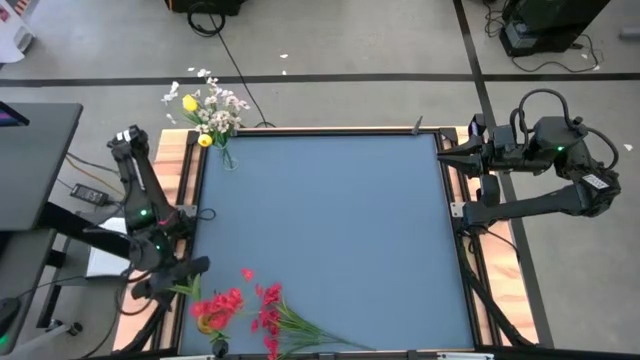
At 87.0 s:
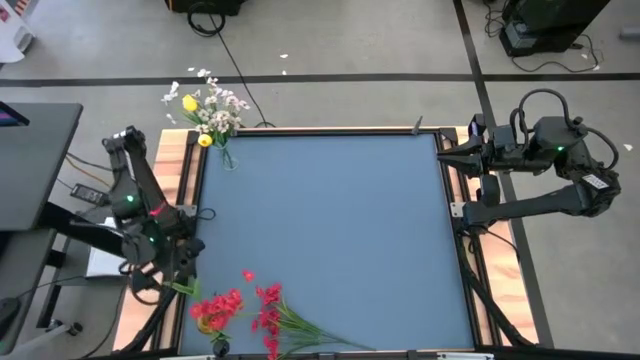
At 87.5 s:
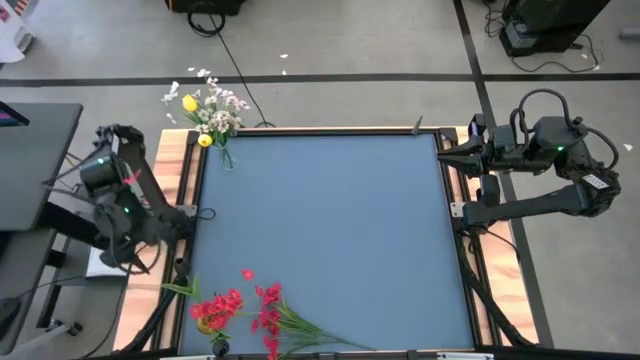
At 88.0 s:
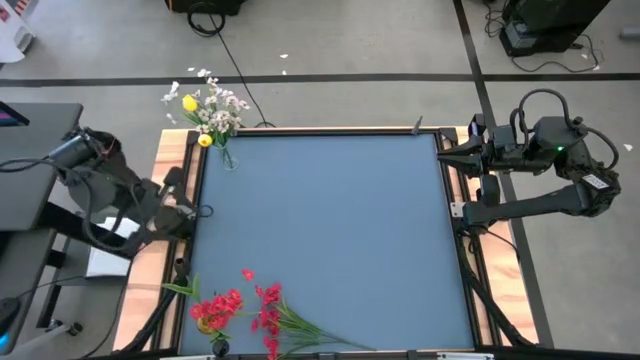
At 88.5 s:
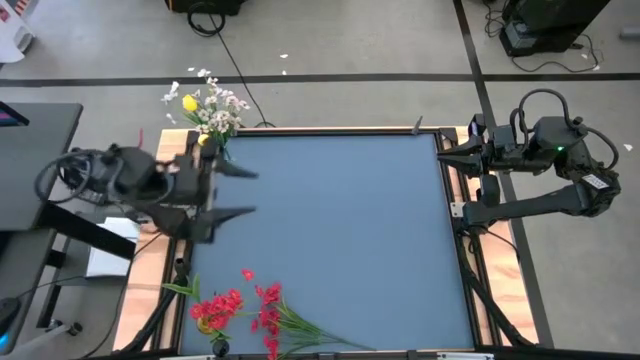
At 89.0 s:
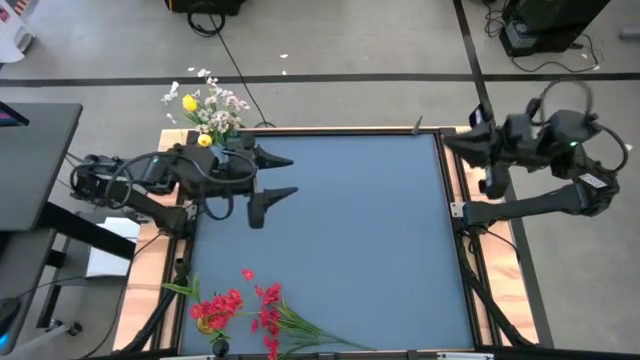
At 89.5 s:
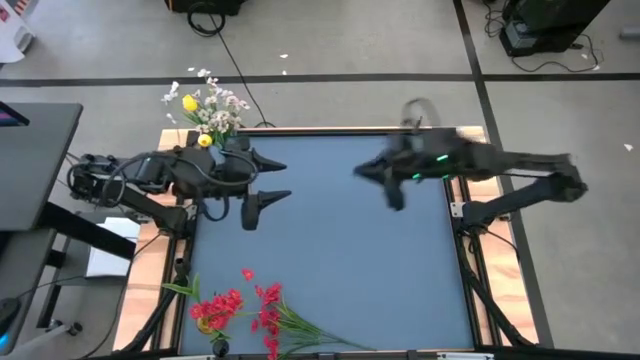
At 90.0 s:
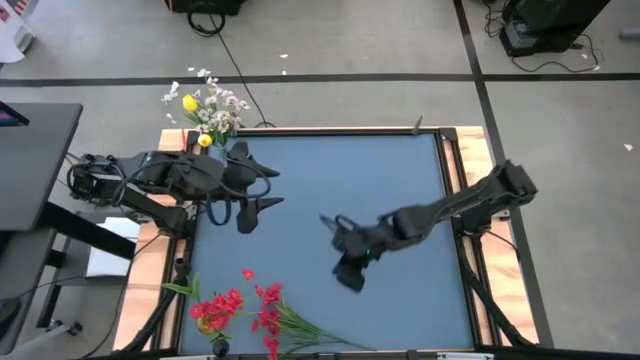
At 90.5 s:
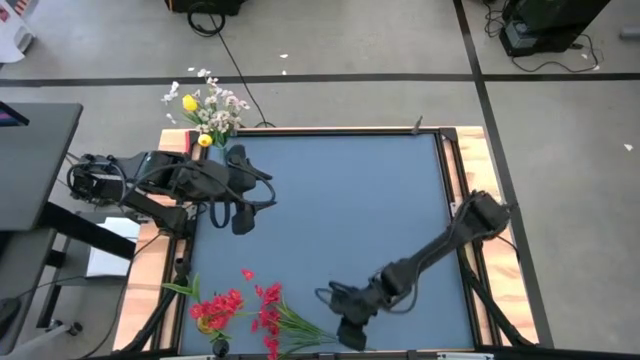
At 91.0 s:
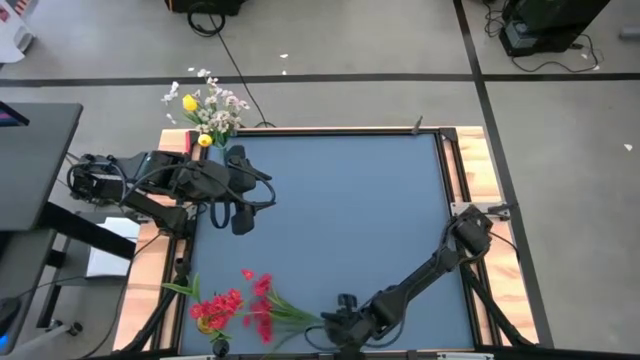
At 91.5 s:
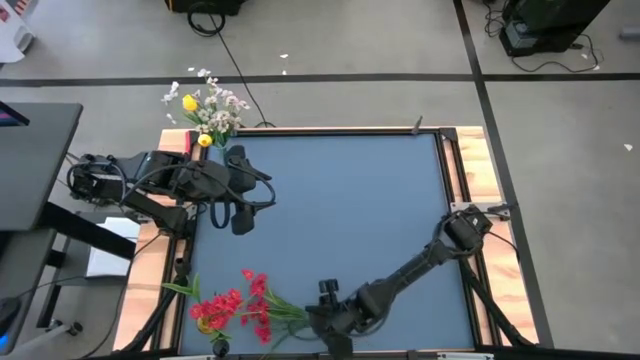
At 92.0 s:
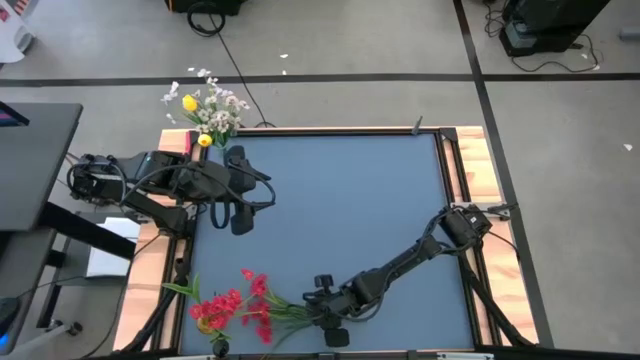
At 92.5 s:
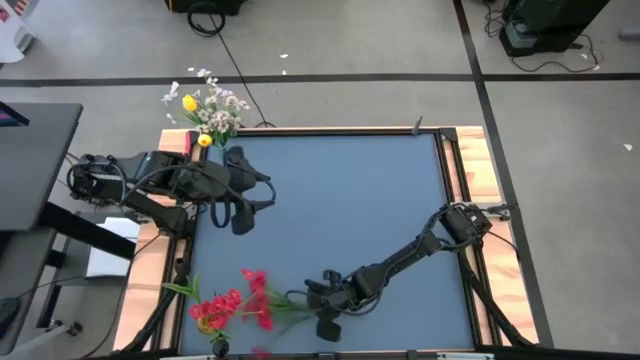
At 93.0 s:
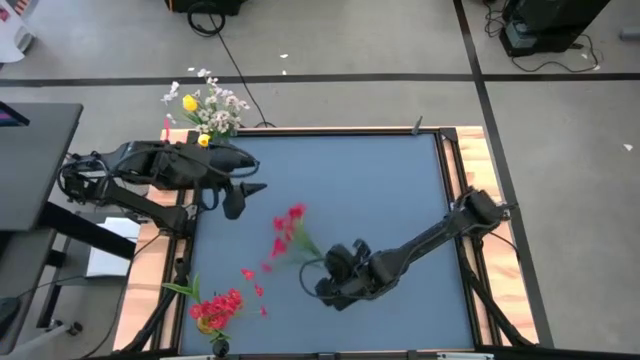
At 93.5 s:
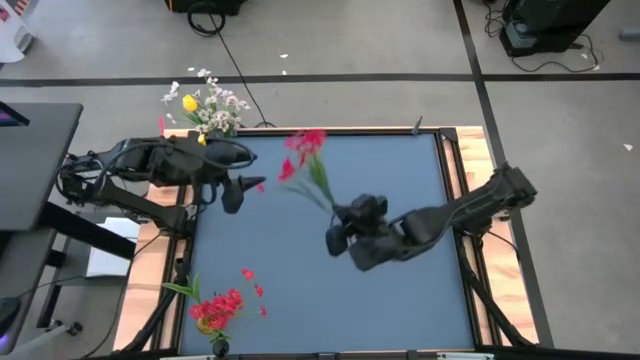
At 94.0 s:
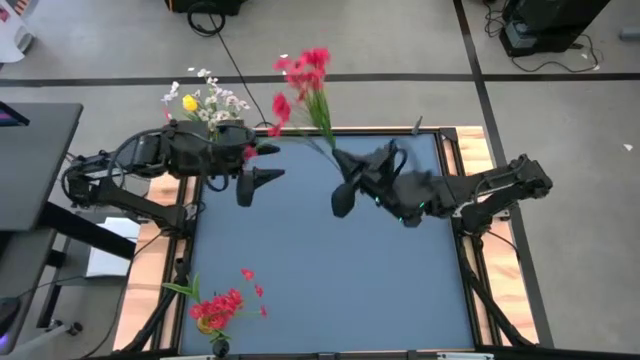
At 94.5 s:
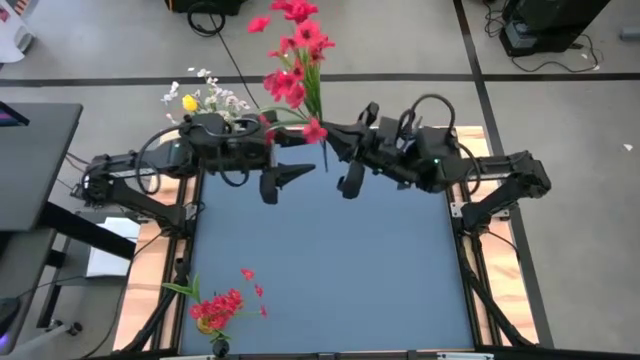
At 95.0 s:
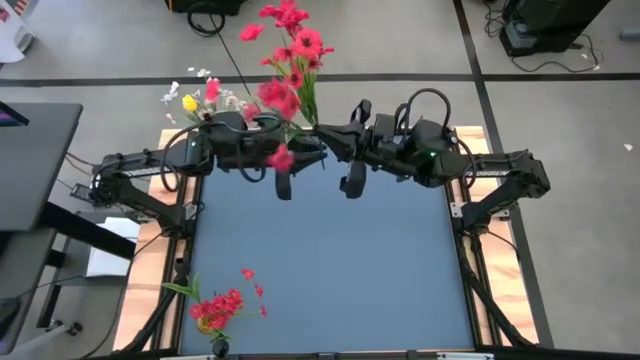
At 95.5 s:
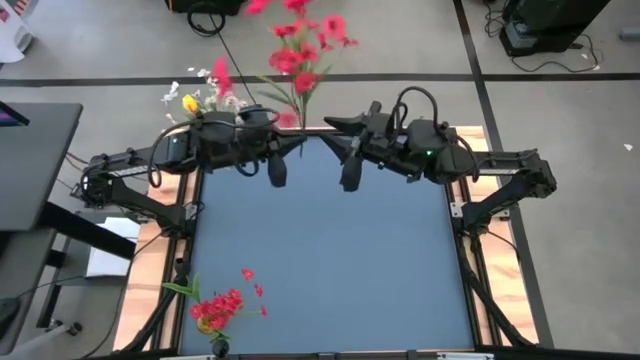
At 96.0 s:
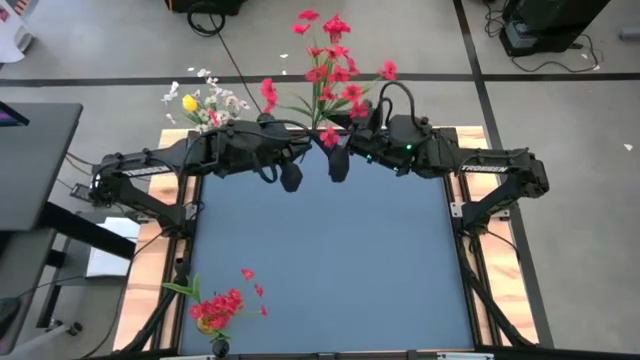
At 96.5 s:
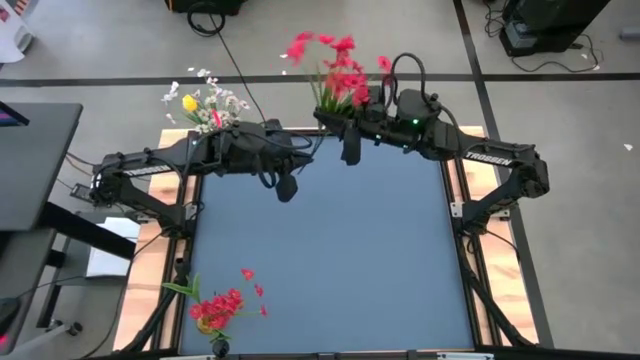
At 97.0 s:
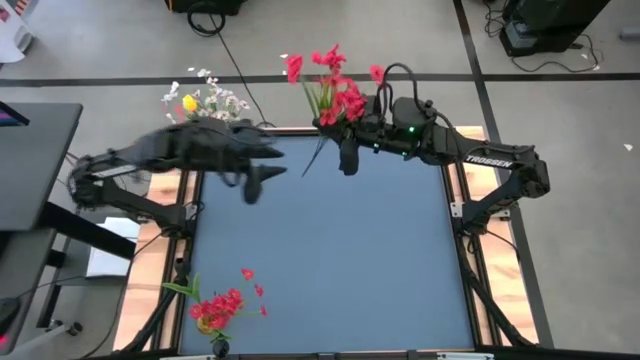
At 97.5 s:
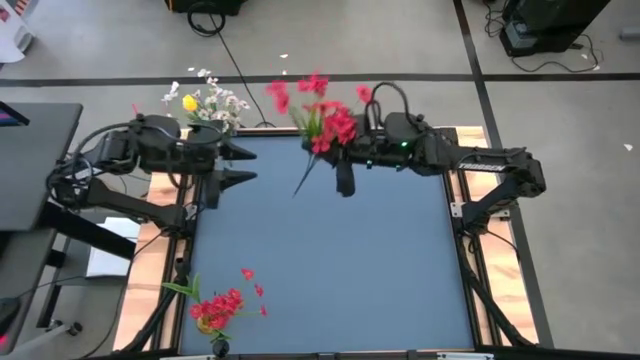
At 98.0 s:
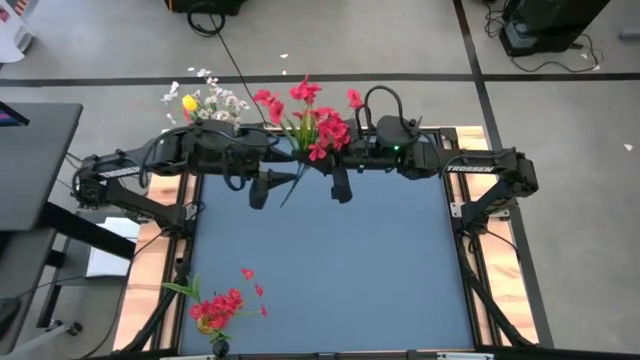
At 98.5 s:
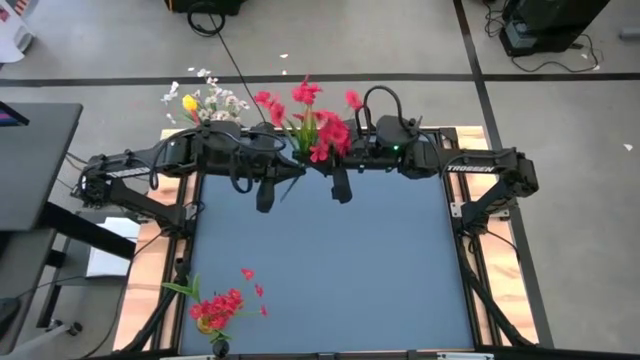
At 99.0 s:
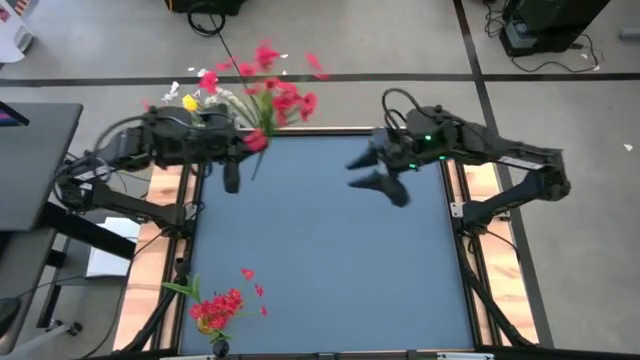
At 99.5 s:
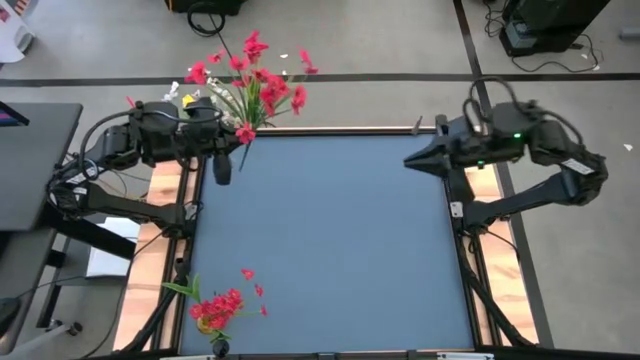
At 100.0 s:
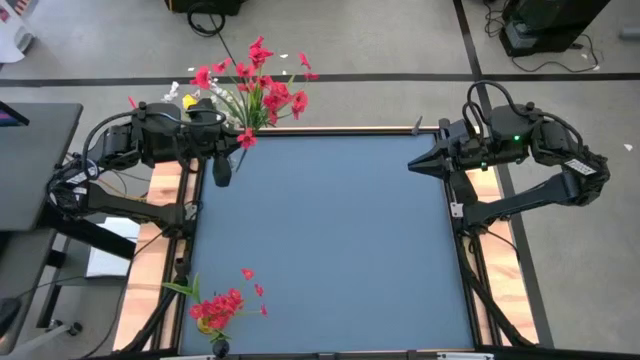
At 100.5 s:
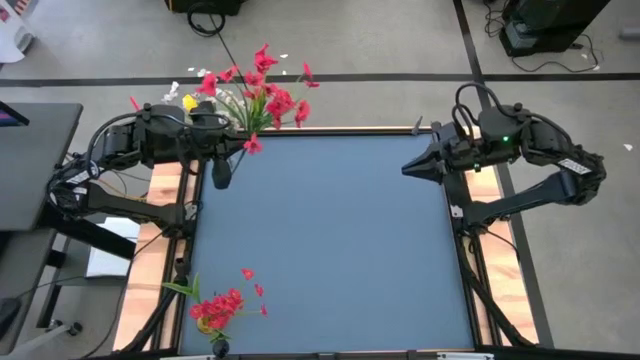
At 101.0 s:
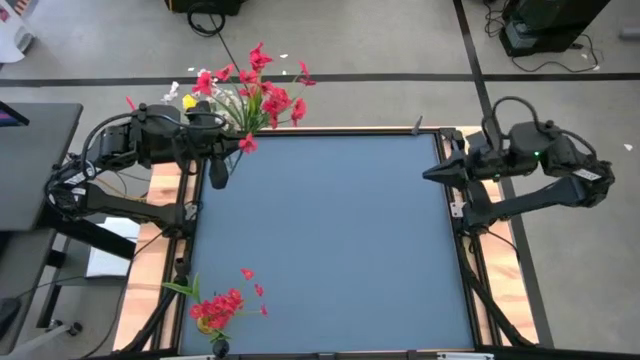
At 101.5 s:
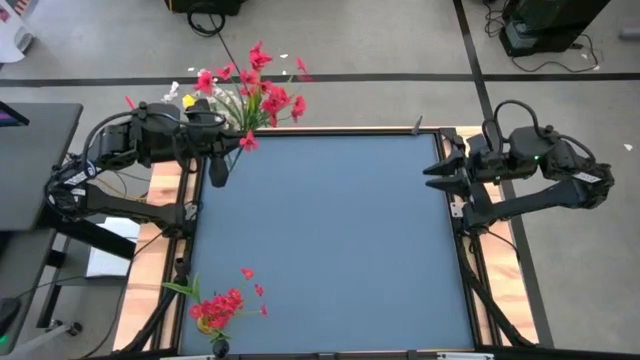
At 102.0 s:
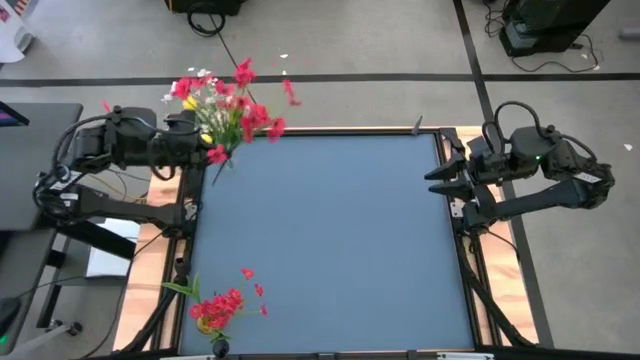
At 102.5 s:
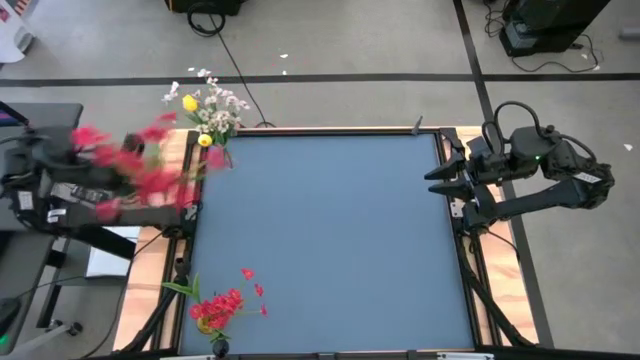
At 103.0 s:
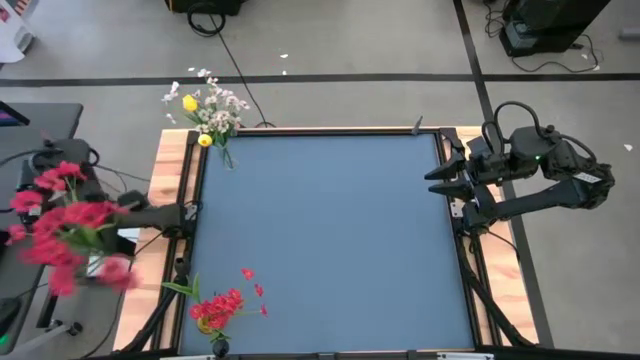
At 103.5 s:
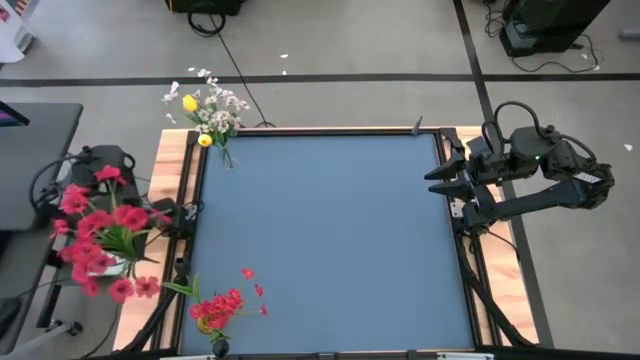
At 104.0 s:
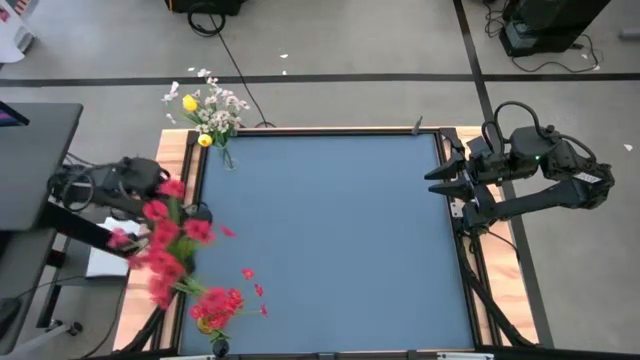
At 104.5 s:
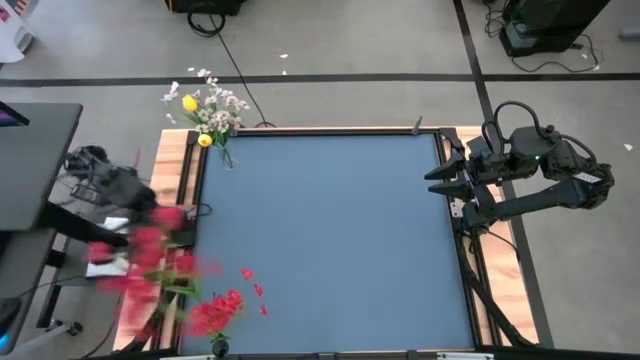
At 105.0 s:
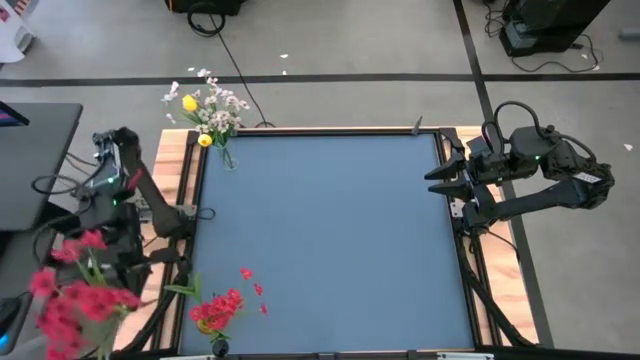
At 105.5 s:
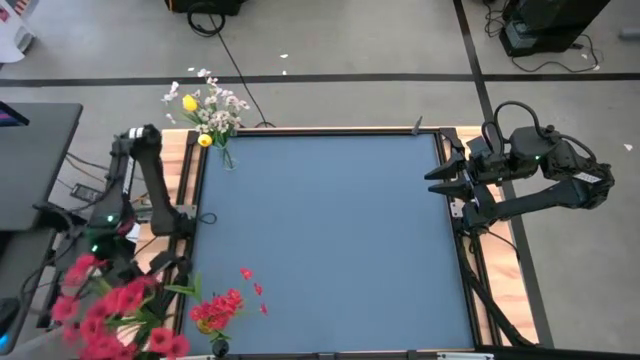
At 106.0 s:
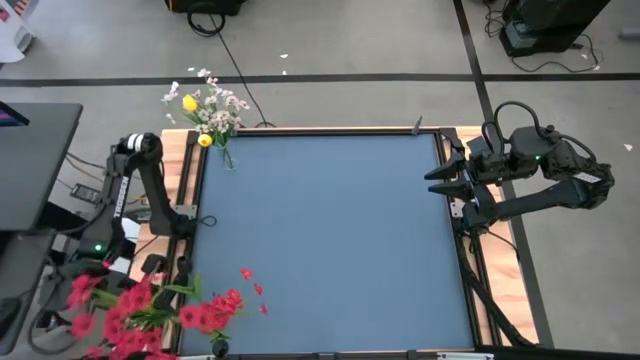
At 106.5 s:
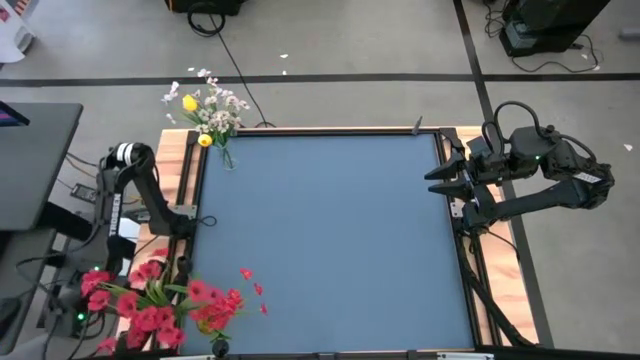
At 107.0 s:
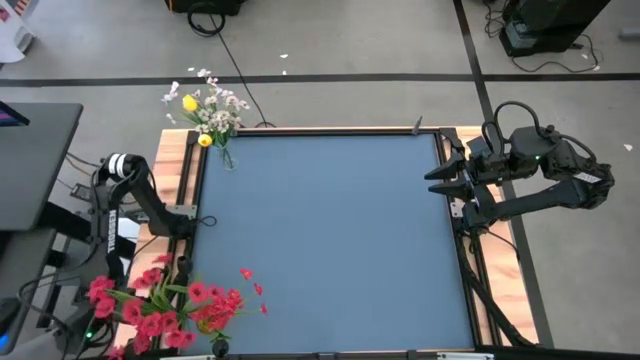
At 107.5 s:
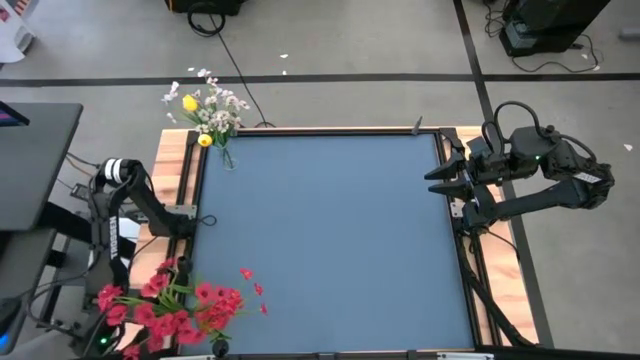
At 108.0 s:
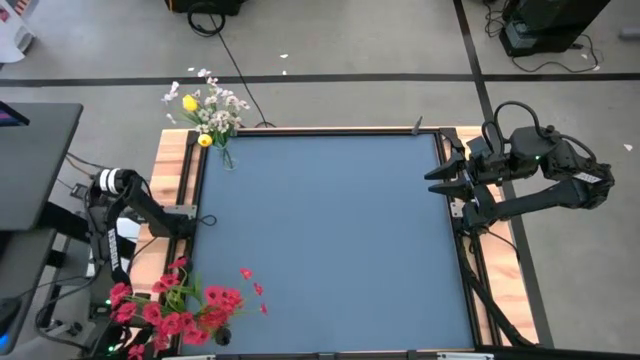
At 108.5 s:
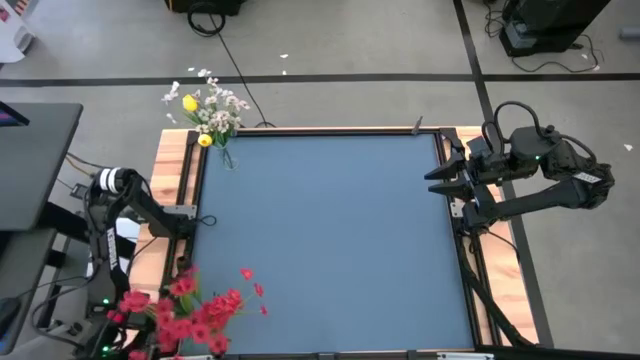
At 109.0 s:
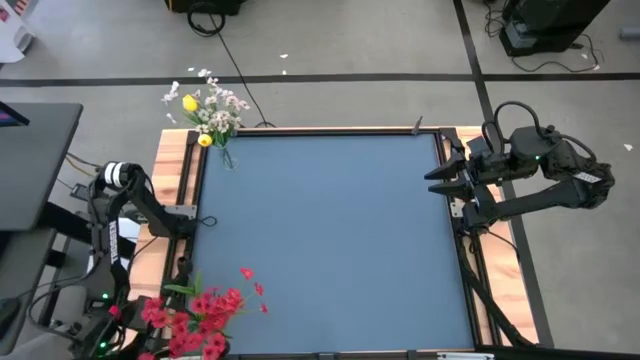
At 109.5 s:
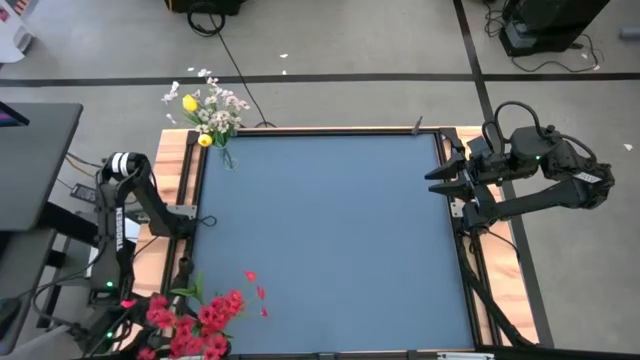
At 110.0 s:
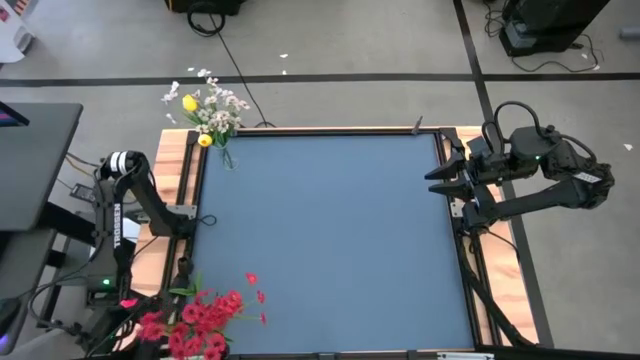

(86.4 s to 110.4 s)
Task: Sort flowers into vase by color
Put the red flowers into the yellow vase
